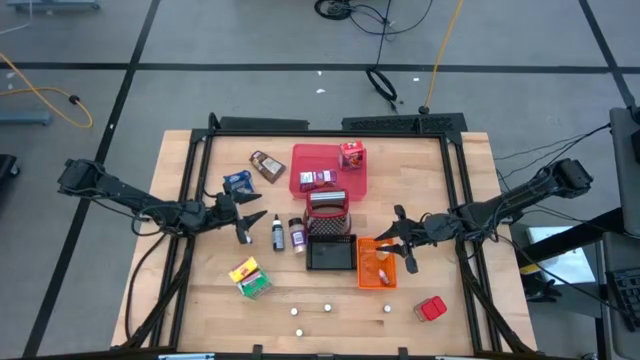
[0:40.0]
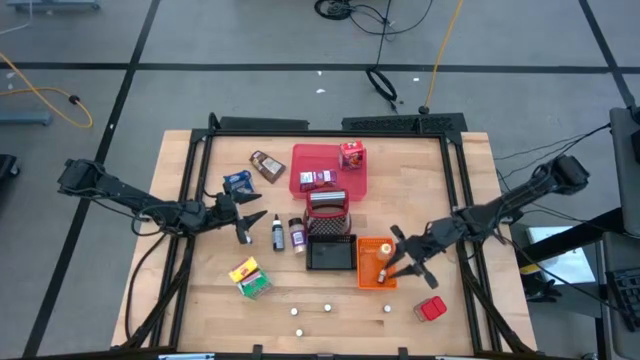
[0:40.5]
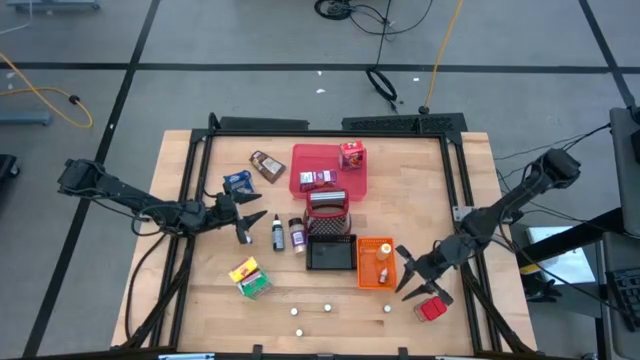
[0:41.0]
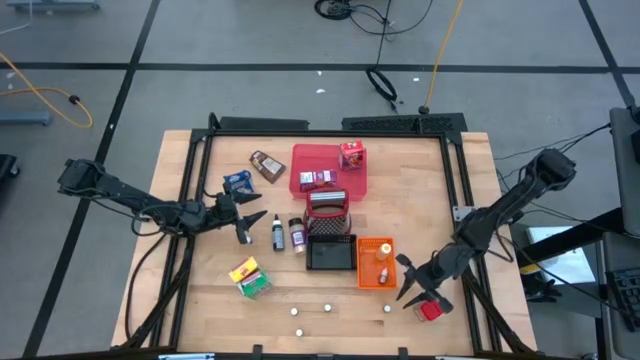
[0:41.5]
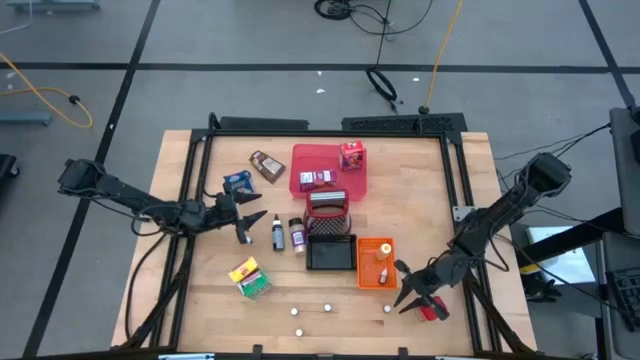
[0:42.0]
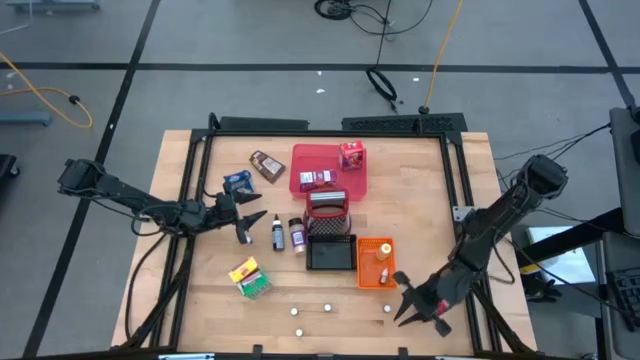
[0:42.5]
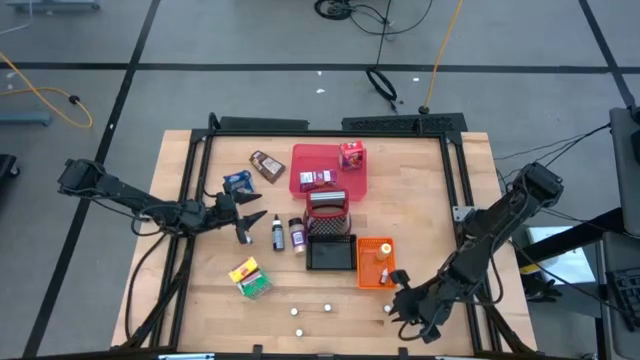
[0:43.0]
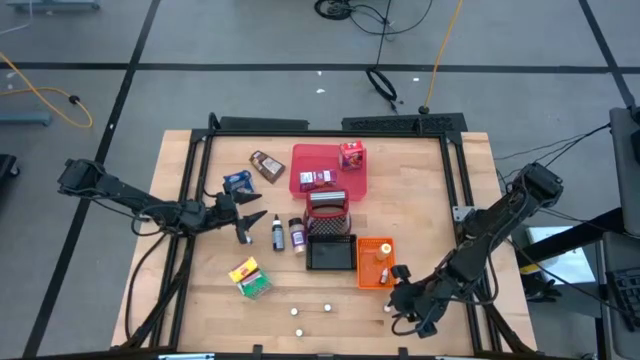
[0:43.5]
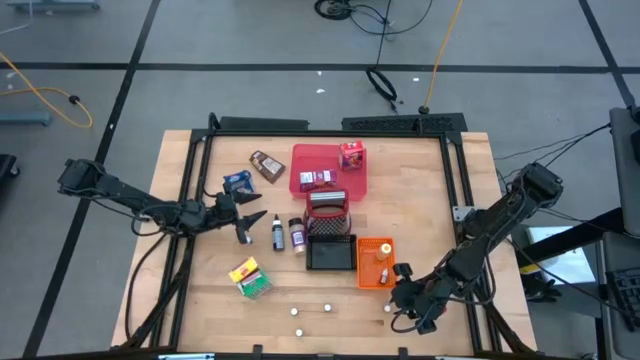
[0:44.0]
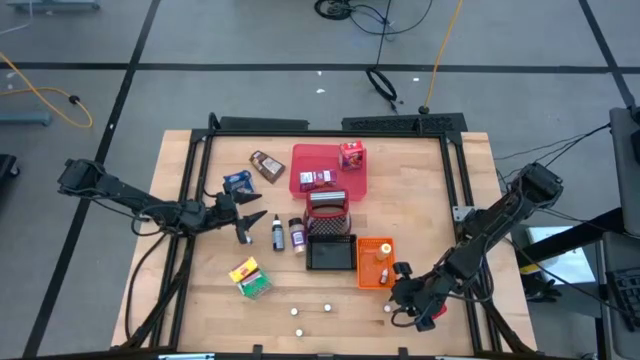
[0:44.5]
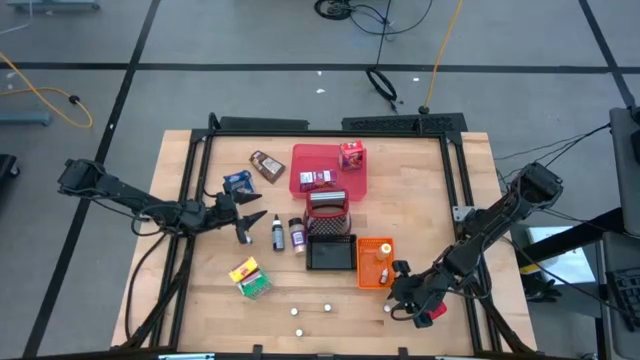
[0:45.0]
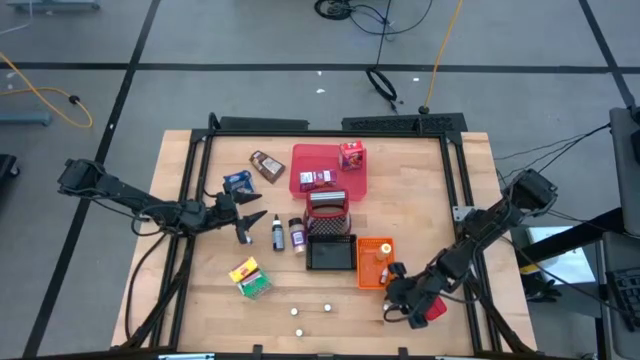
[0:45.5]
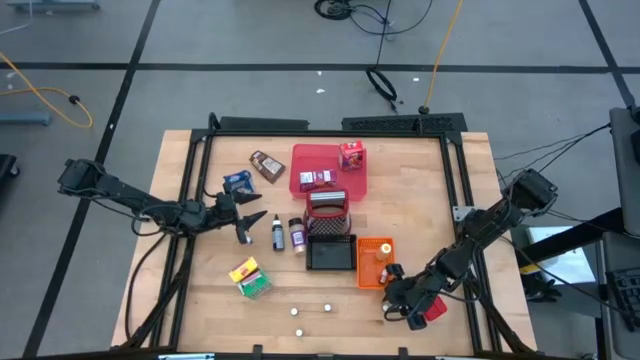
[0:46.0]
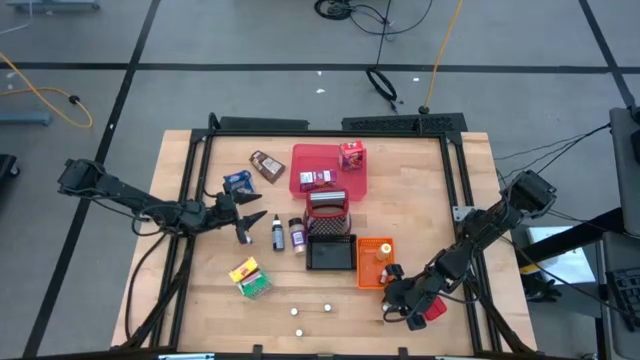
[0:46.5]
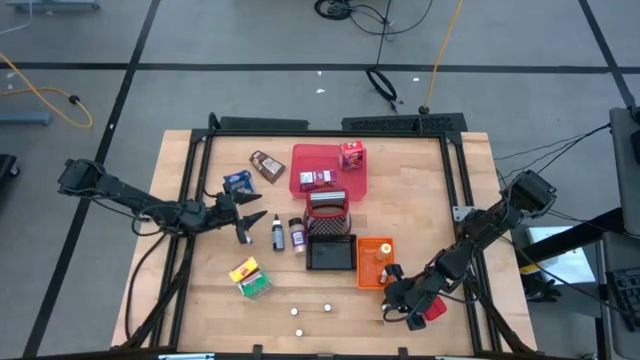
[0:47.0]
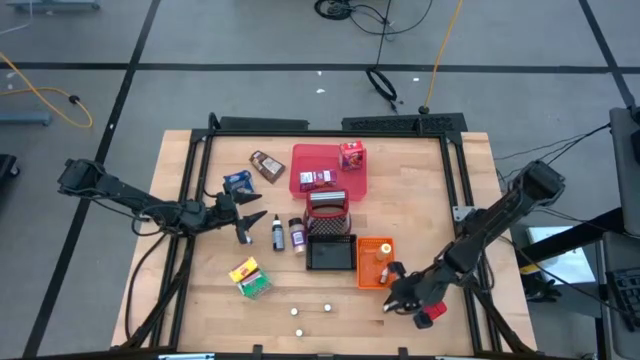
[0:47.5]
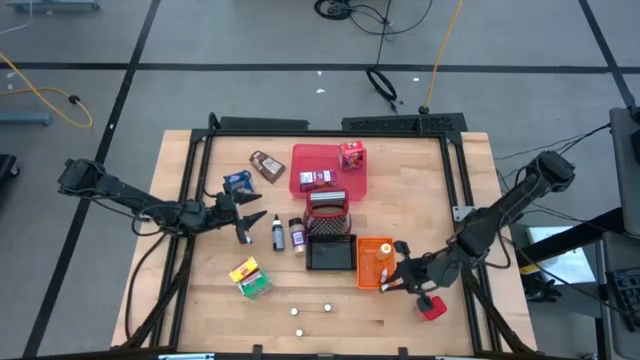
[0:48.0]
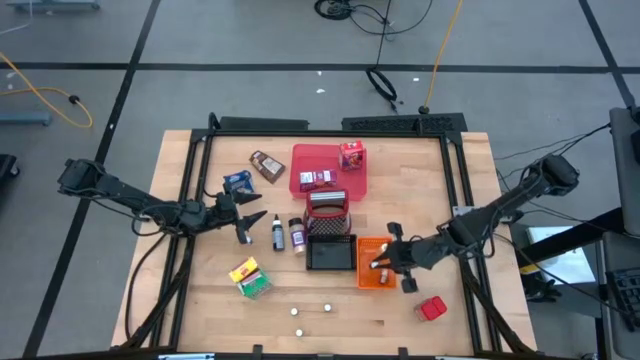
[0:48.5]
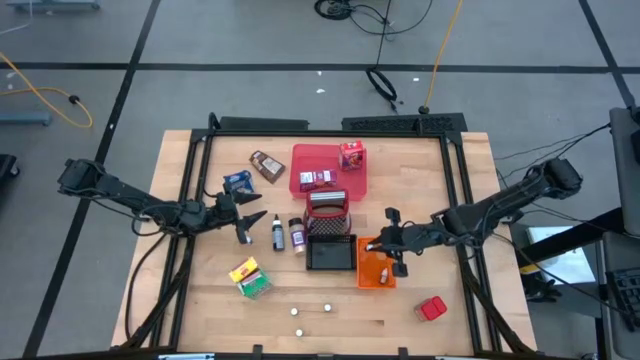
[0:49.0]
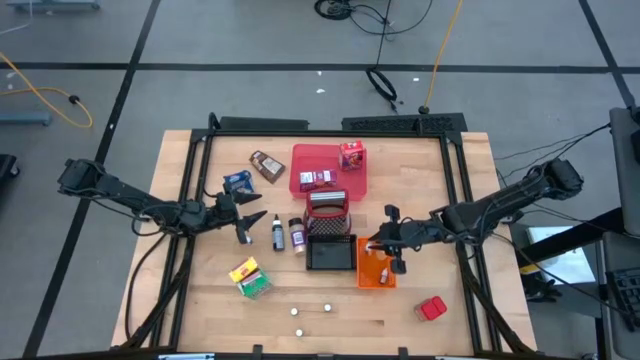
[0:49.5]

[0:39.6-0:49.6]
Task: Pick & Place Kitchen Items
Put the right small black food coloring bottle into the orange bin

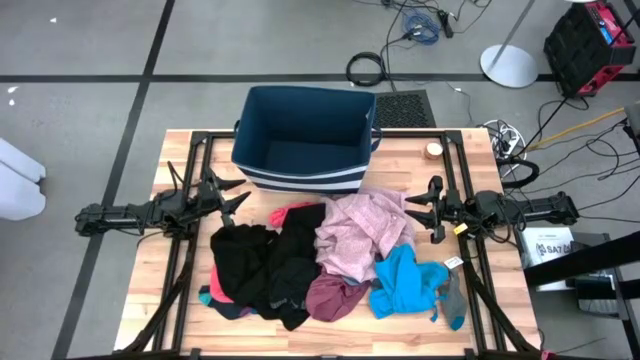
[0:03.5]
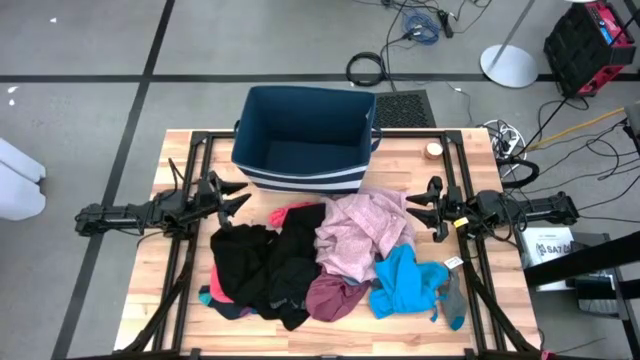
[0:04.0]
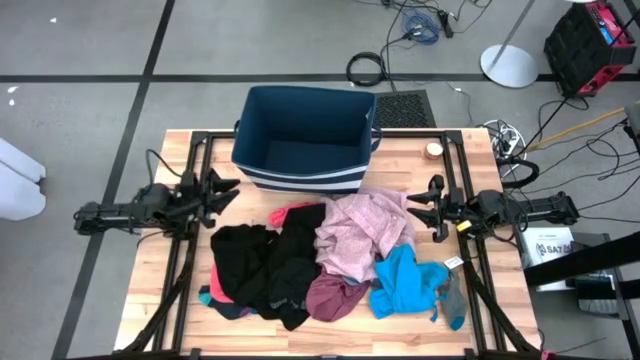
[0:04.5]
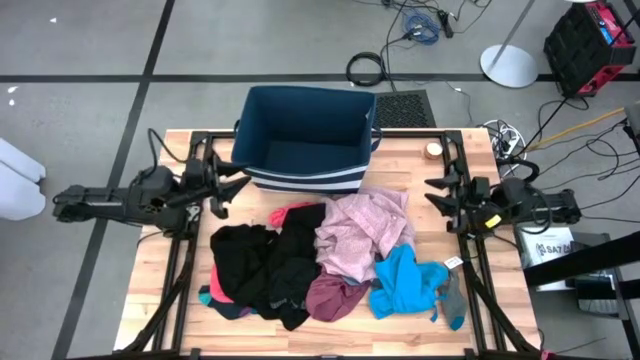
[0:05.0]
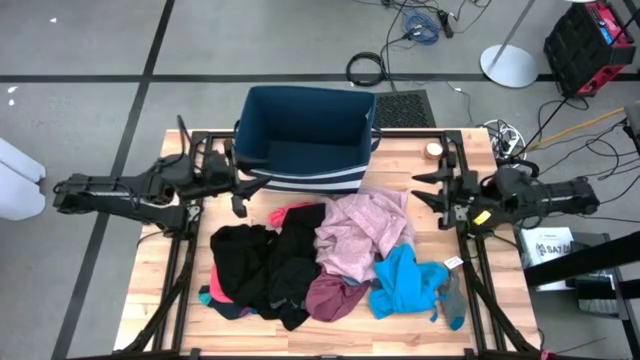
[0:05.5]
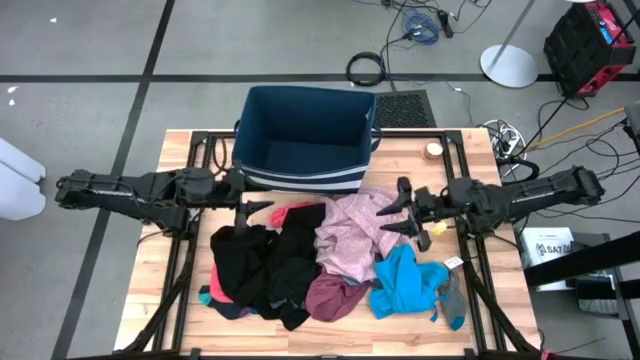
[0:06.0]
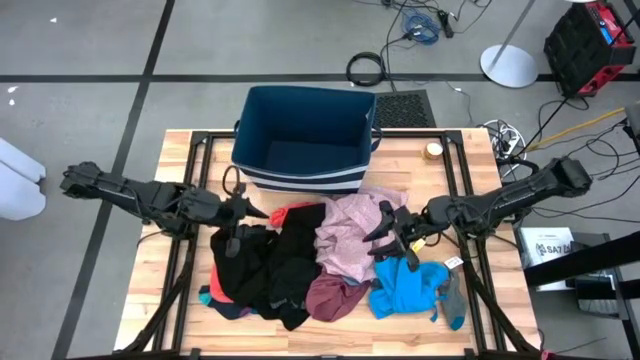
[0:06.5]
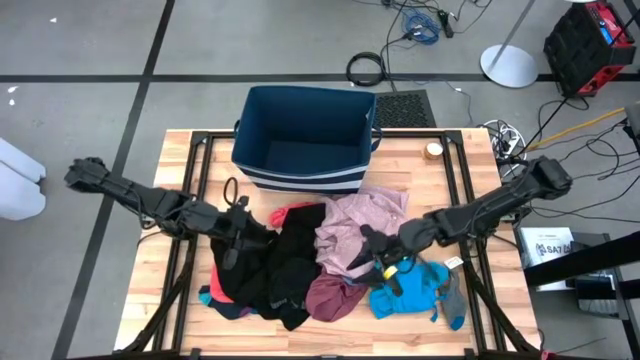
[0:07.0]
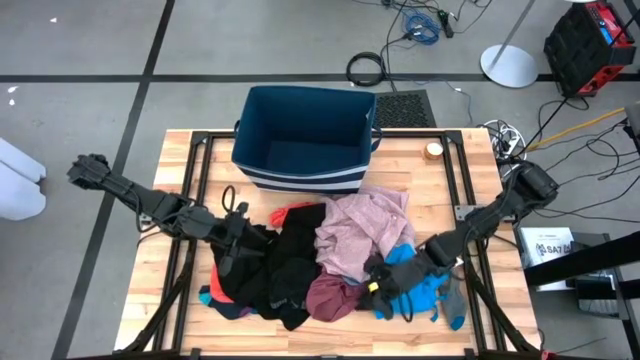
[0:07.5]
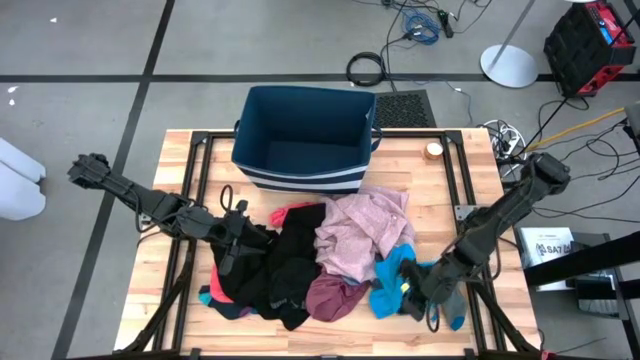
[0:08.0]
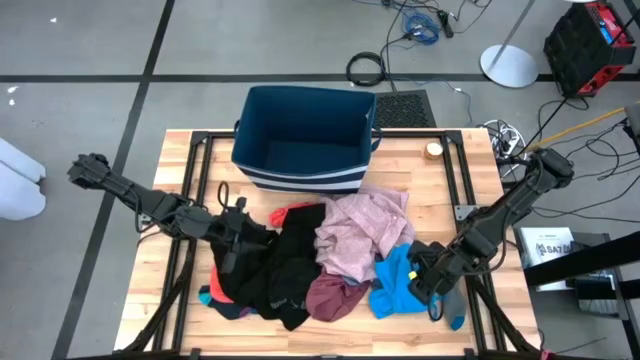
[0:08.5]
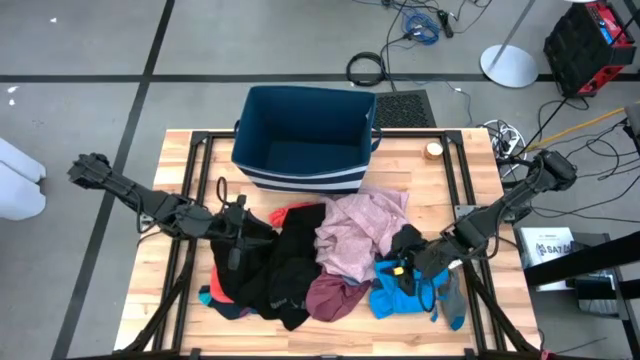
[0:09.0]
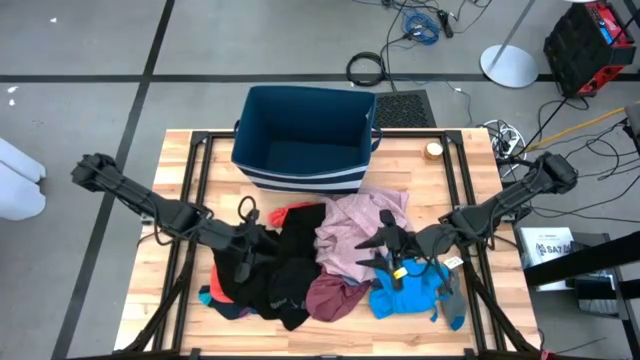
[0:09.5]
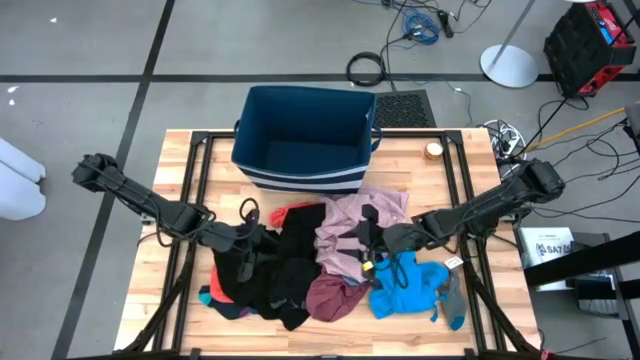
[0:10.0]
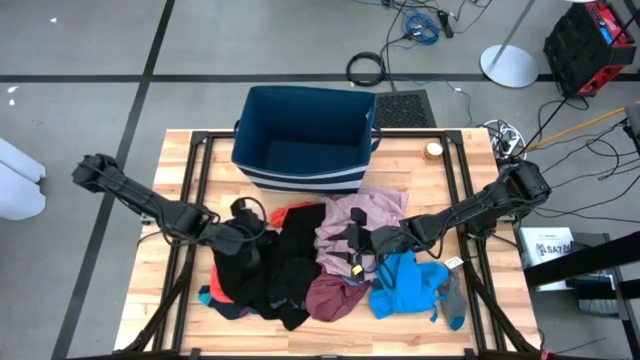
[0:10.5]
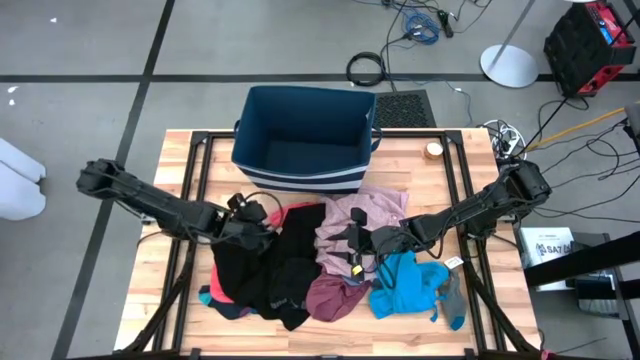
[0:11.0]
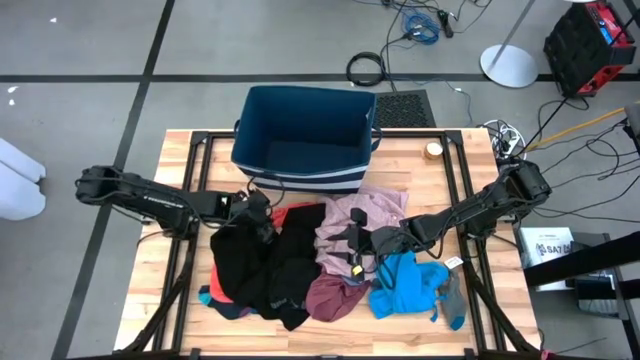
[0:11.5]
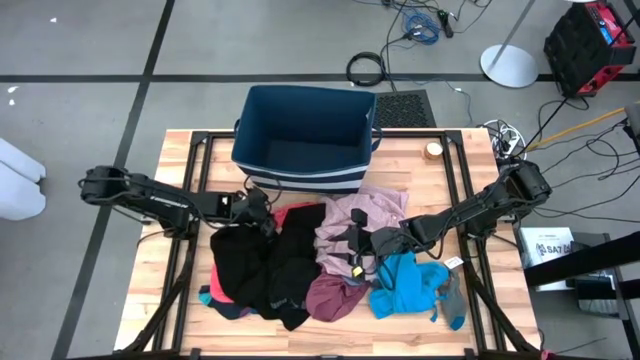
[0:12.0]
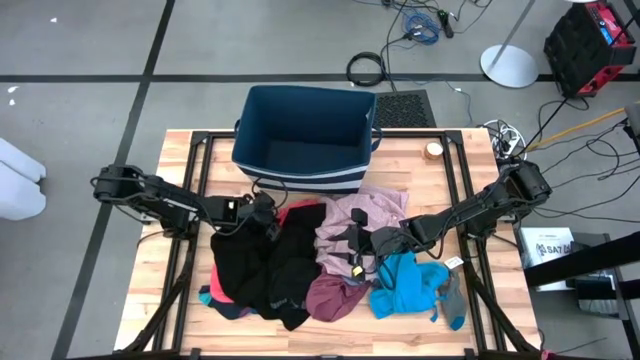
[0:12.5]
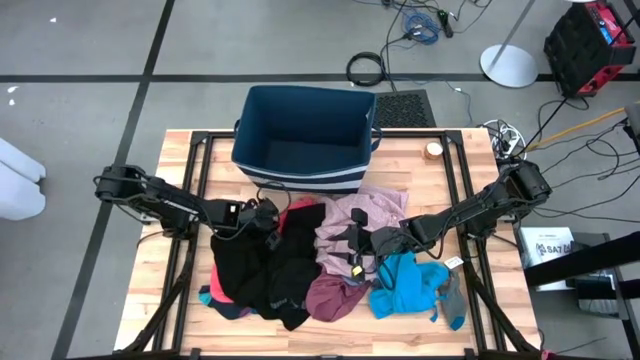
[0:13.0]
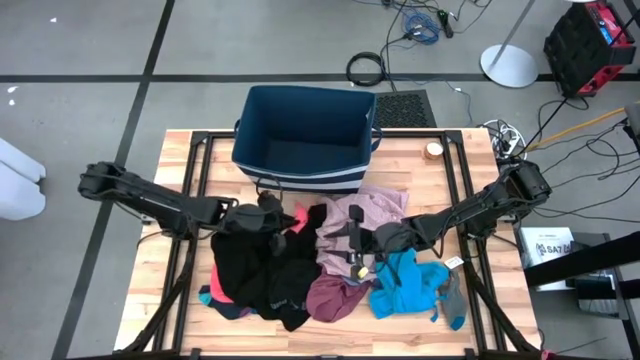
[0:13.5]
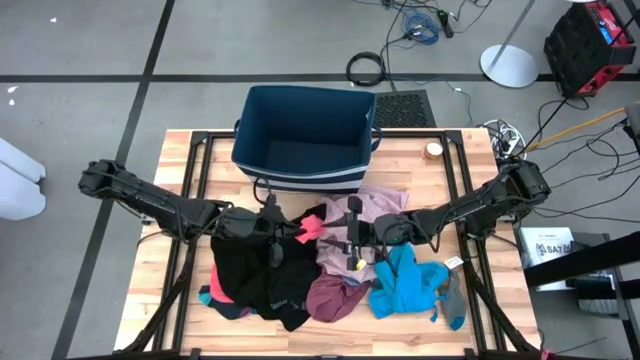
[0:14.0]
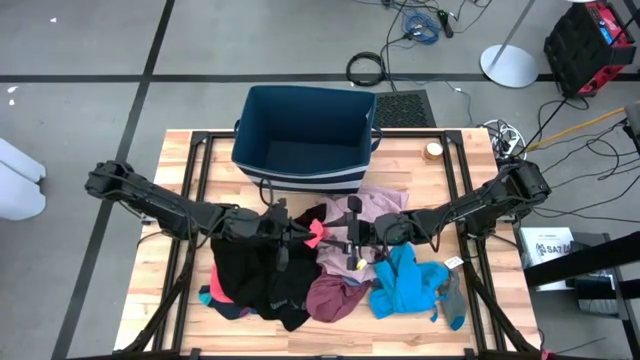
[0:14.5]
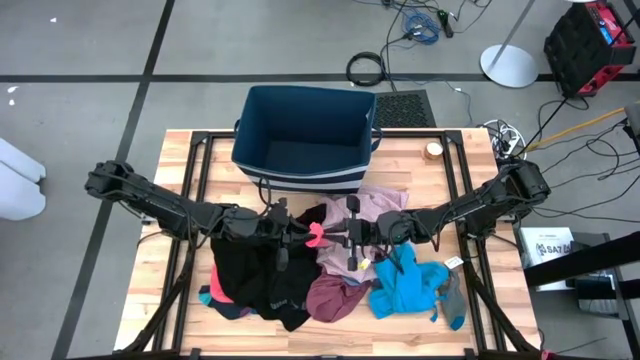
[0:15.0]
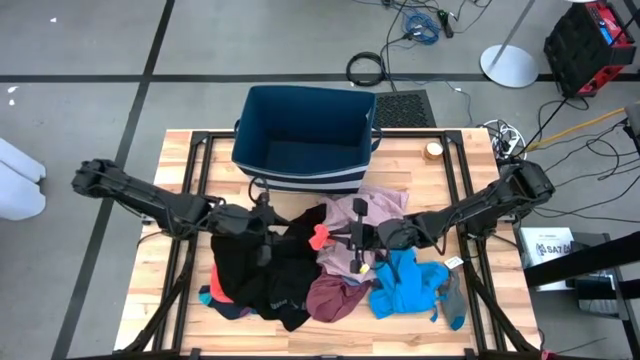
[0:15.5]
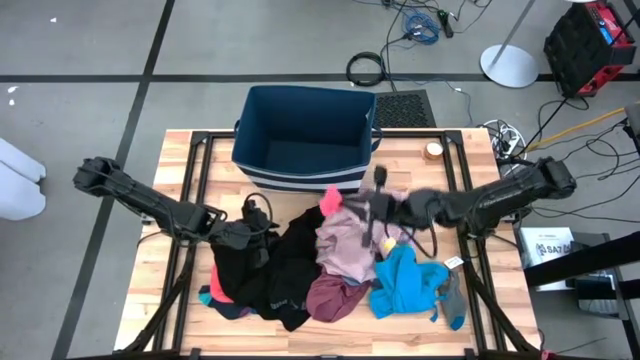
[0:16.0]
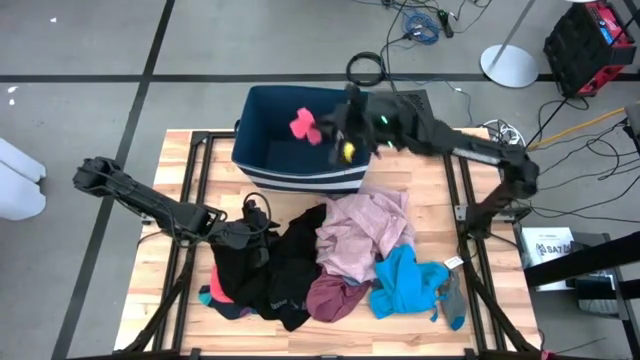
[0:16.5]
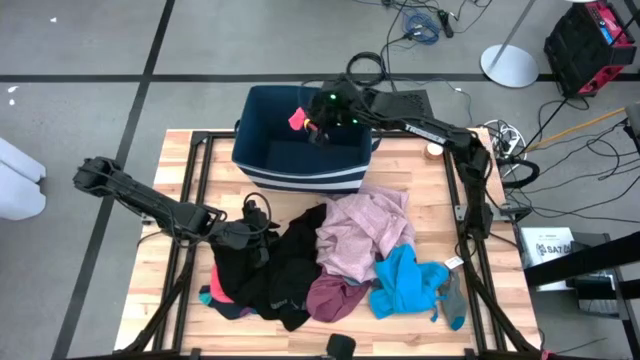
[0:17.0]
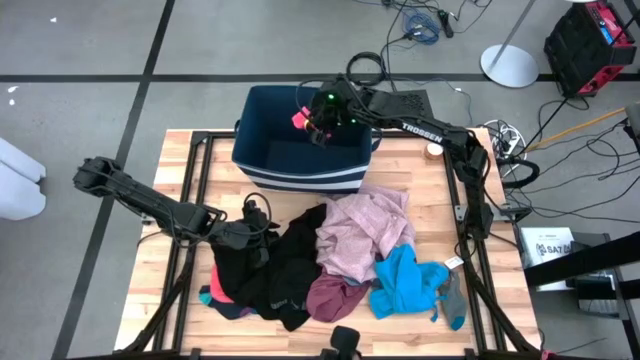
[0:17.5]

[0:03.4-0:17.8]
Task: Sort clothes
Put the pink sock into the blue laundry organizer
